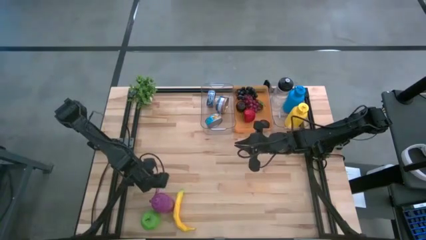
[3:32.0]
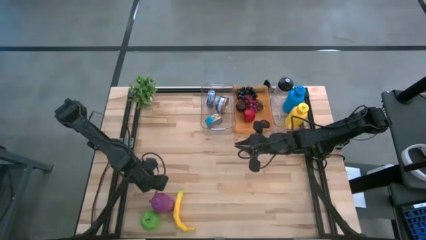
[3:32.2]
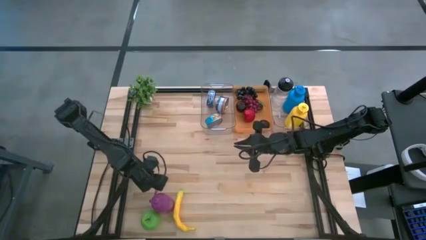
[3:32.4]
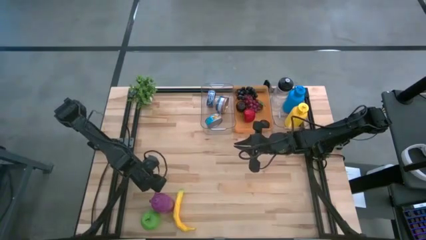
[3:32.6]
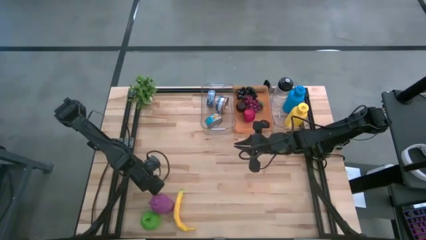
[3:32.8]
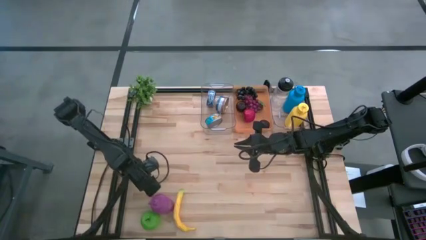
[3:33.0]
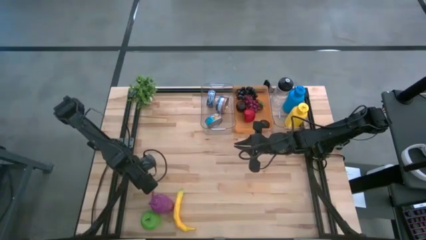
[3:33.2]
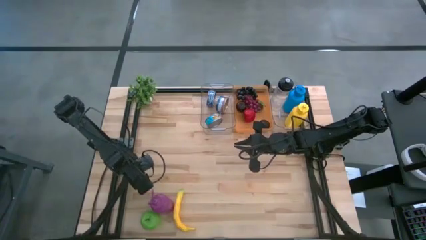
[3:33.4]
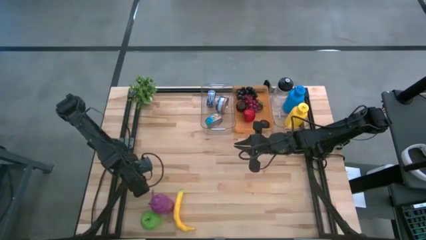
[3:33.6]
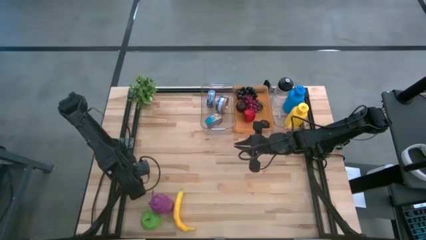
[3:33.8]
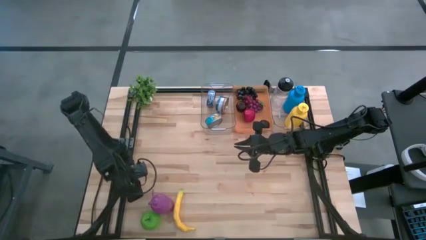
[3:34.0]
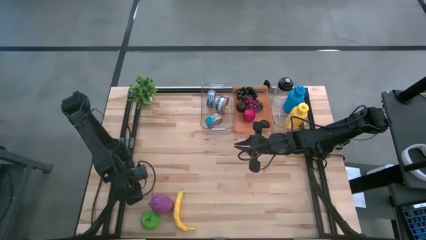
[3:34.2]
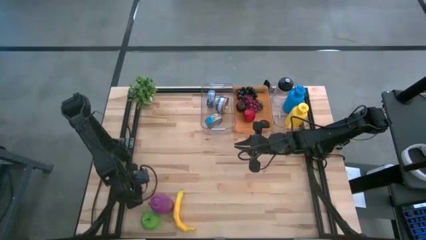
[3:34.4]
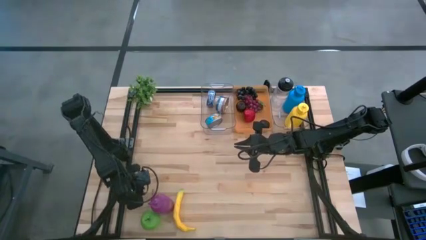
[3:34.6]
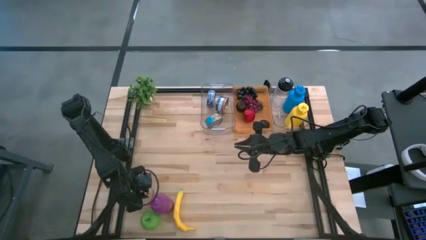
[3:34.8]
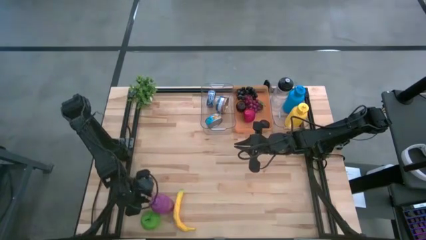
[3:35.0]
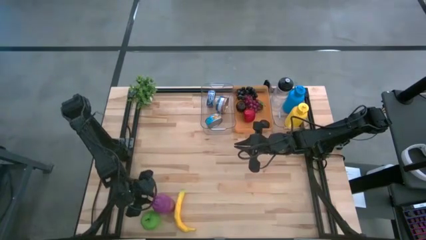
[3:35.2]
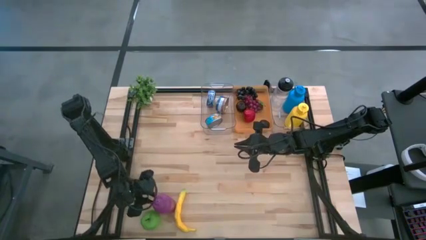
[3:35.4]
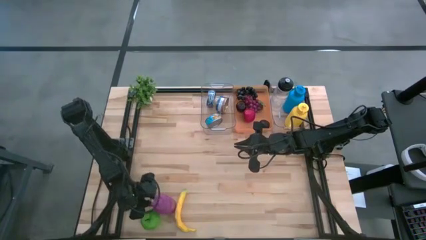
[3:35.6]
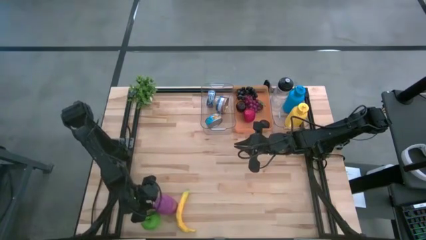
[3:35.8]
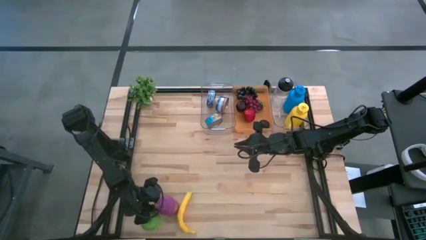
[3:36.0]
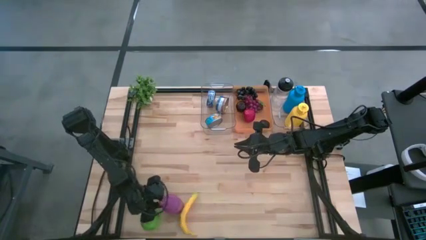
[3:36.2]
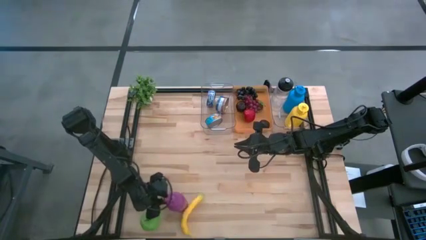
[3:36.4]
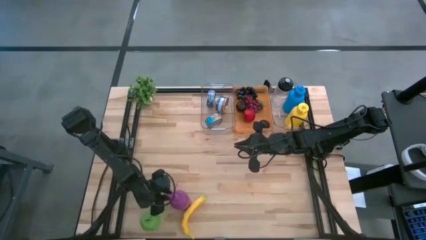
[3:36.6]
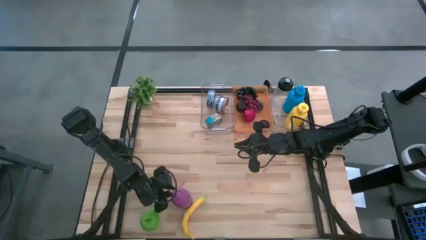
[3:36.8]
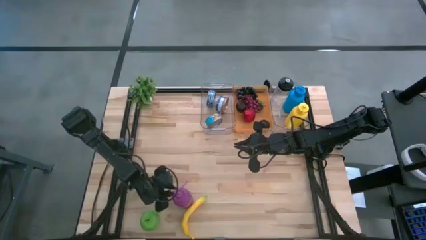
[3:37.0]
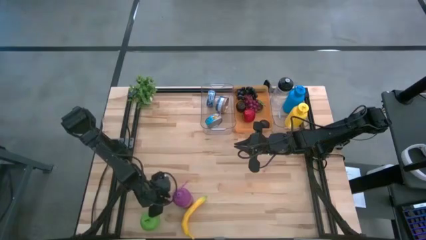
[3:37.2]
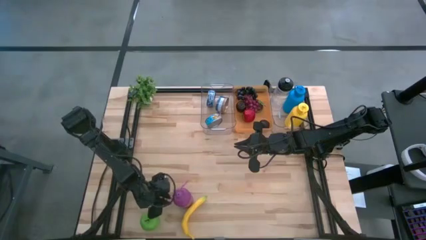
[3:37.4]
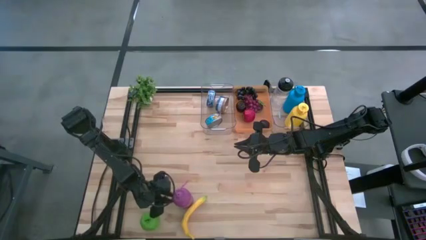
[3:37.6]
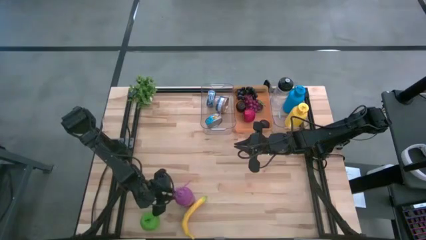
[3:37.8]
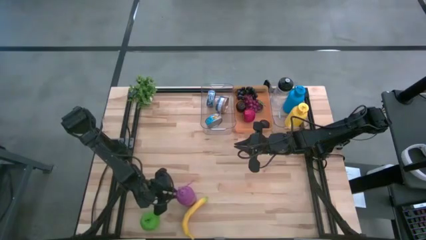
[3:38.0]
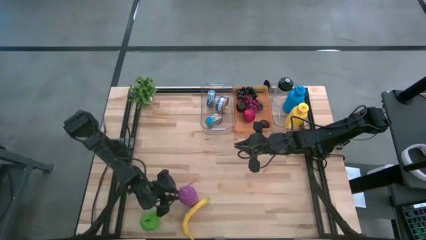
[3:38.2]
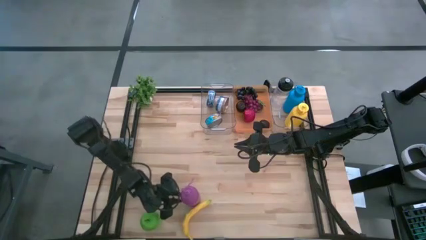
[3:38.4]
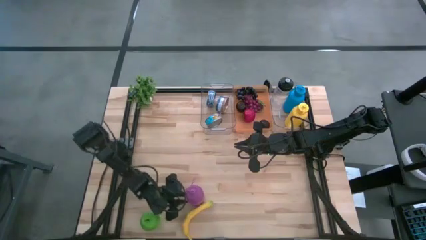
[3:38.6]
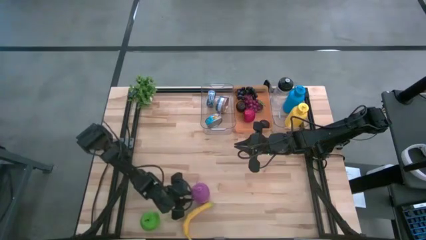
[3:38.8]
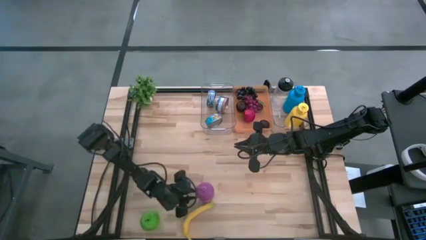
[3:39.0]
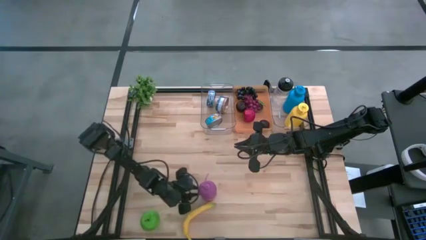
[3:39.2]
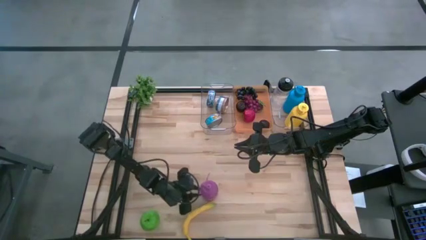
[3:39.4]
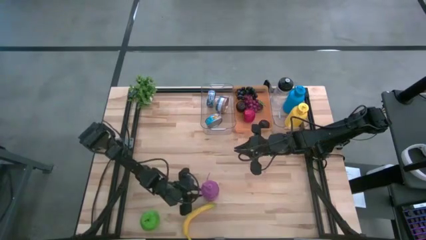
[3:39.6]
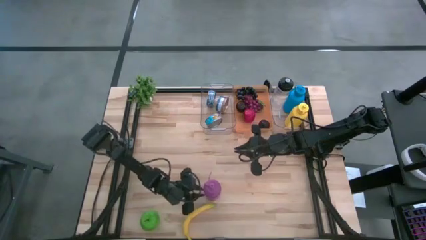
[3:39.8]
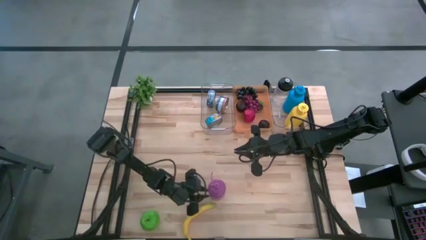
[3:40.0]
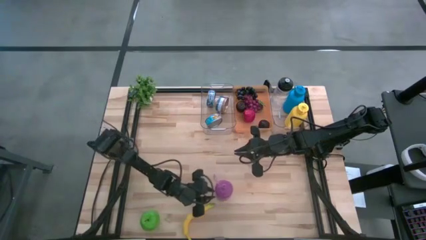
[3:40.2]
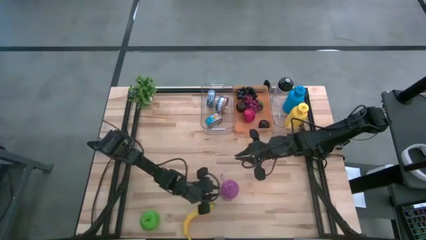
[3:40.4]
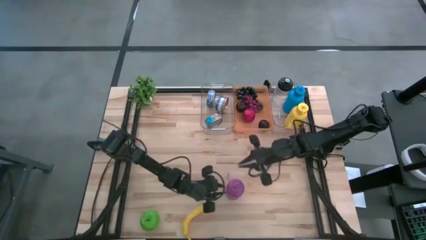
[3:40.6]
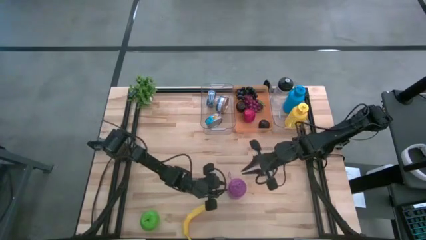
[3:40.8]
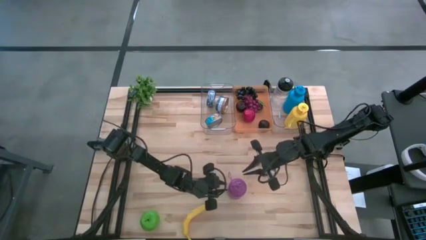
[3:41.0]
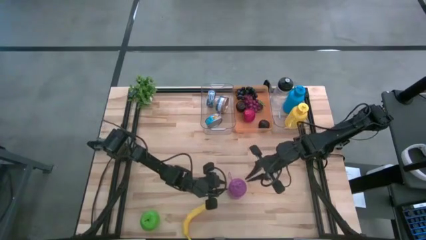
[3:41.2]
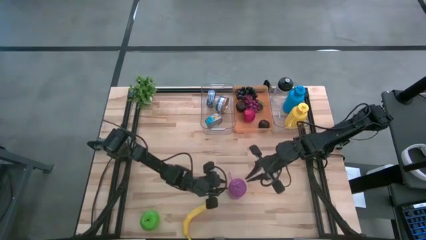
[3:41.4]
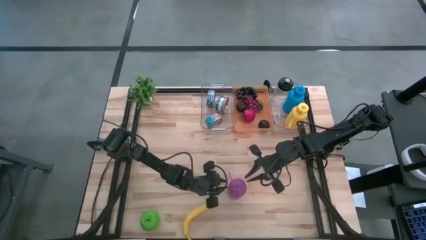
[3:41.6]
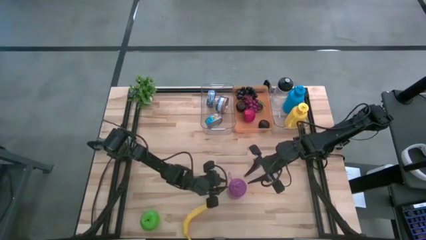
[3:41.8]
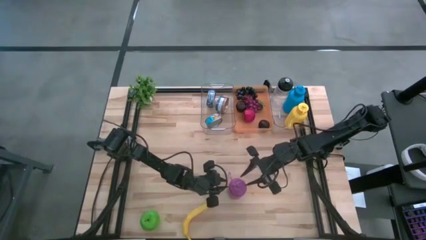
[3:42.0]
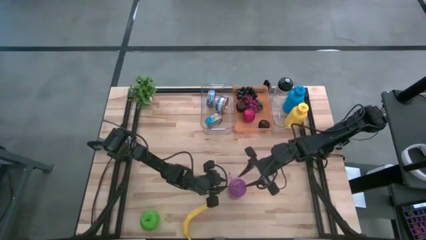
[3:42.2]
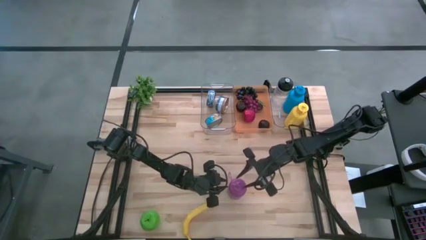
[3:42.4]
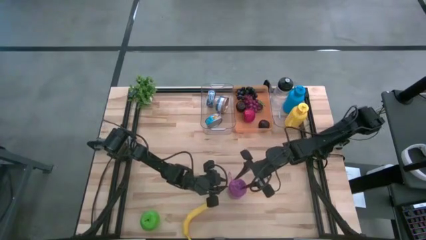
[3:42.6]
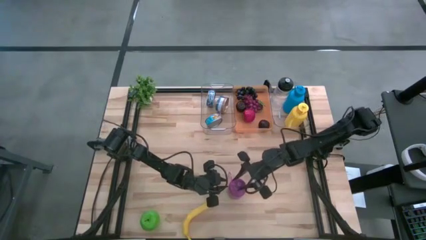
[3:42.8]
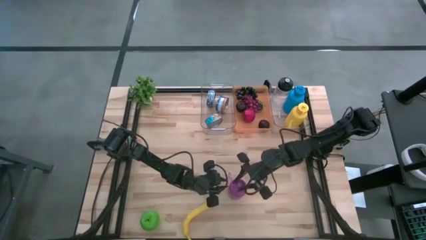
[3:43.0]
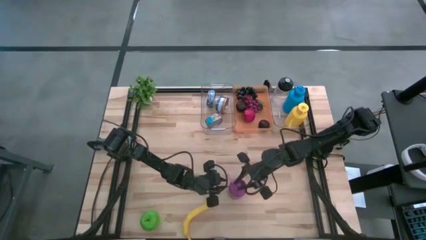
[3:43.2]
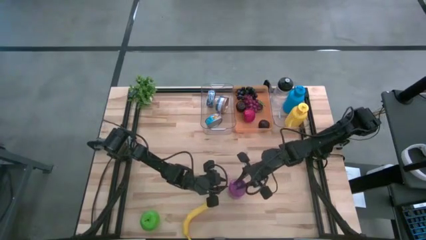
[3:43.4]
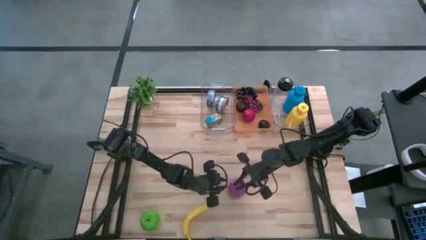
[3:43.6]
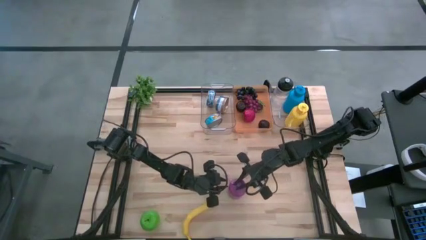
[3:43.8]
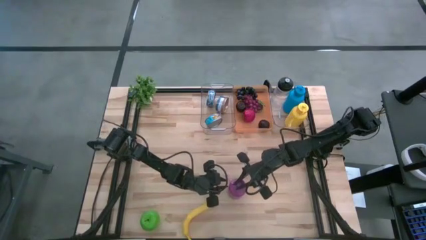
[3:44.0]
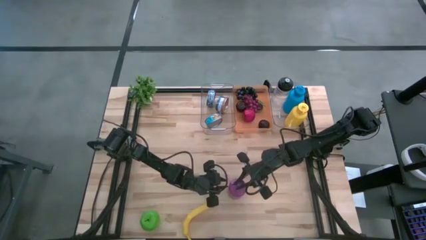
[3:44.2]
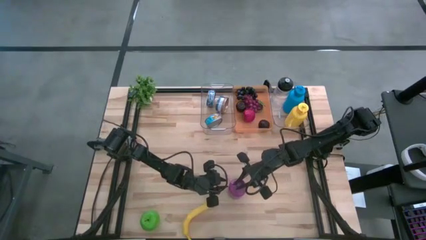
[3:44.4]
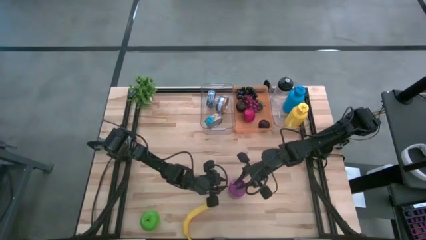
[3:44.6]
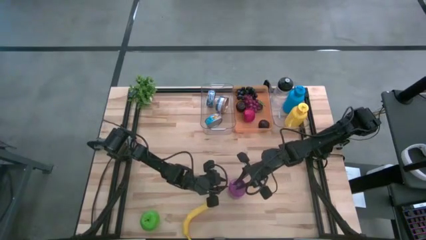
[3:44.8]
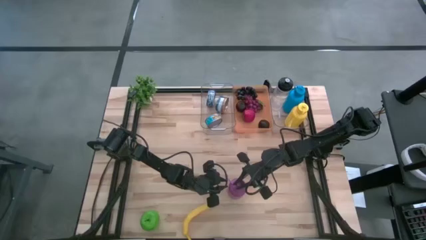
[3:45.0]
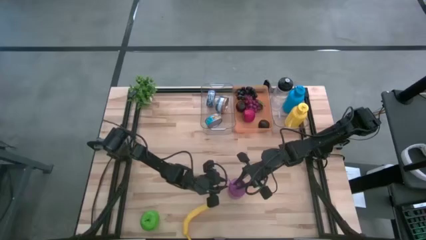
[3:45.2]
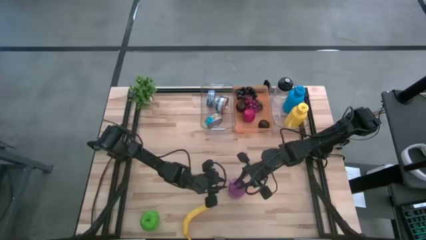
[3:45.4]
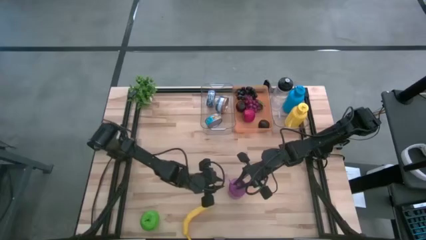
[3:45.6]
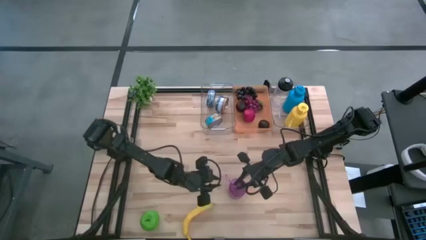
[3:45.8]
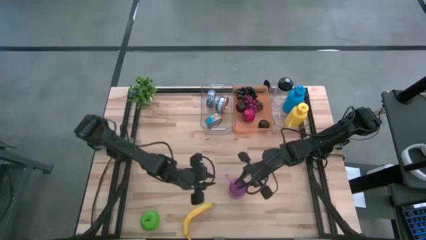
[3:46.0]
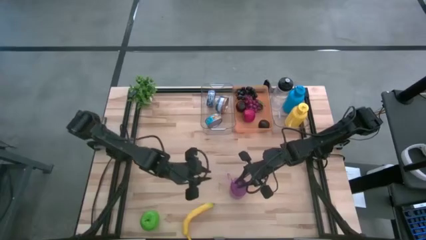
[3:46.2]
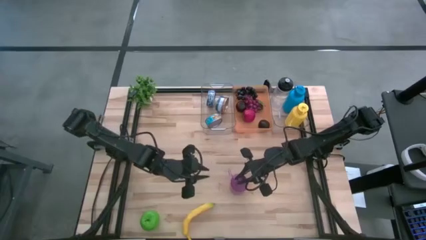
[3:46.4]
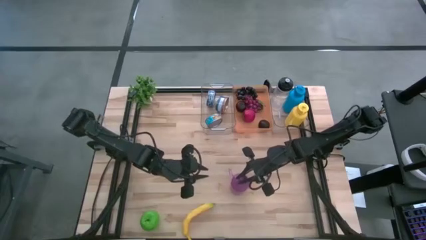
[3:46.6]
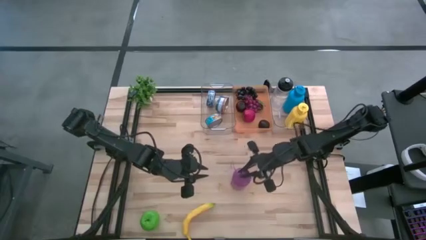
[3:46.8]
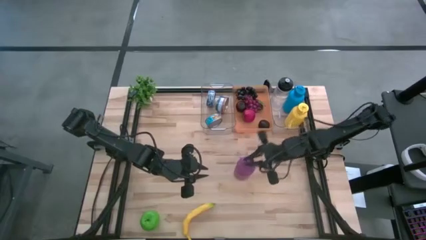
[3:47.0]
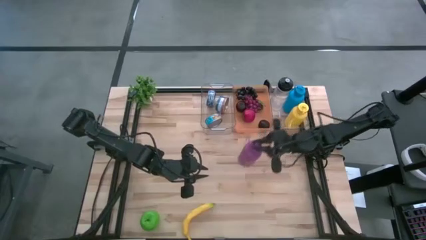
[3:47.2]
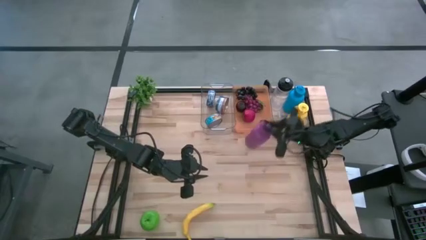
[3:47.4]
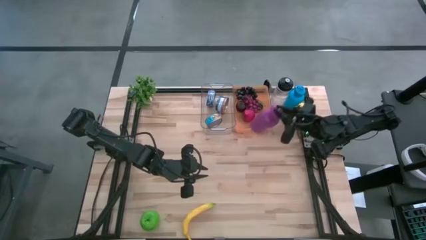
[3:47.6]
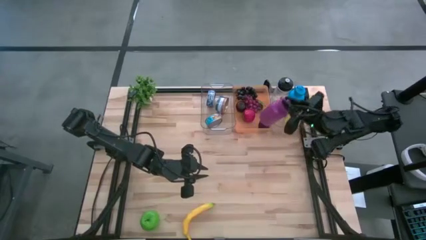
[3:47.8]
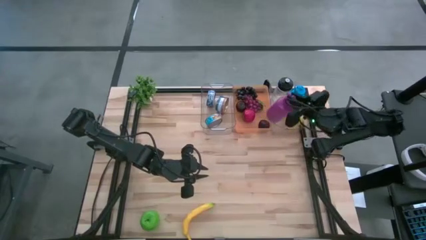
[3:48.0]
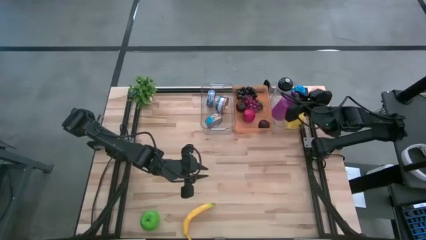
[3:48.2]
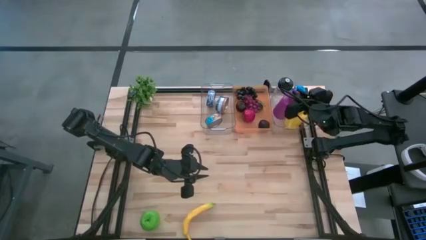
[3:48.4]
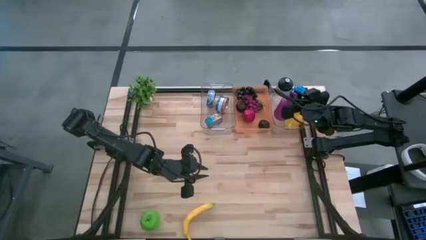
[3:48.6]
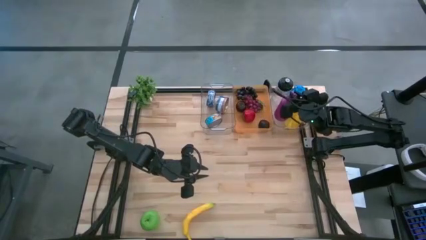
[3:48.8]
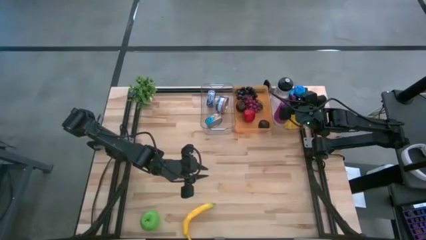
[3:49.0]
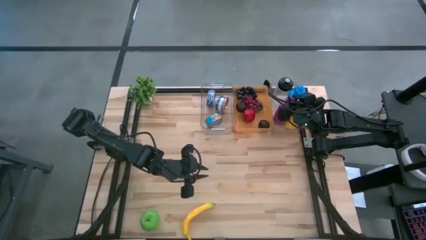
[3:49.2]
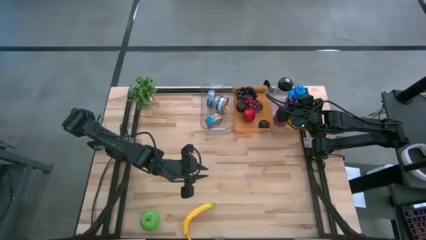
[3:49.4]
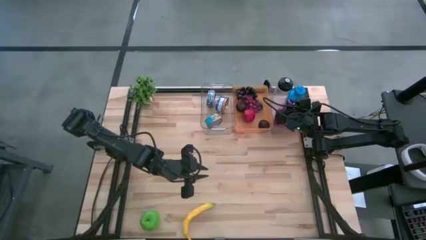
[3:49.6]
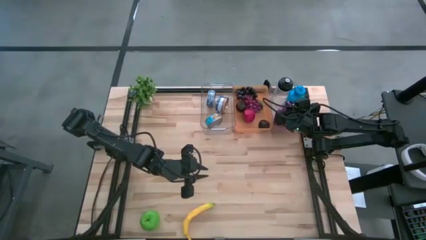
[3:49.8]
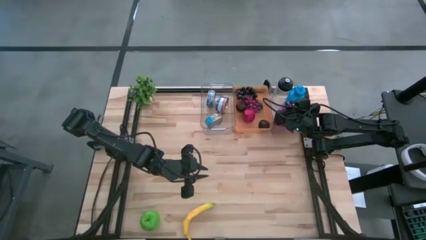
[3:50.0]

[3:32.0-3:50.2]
Task: Pick & Place Food Item
Put the violet tumbler into the right transparent bin
